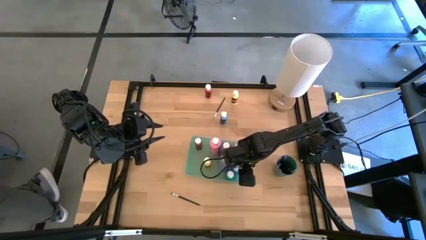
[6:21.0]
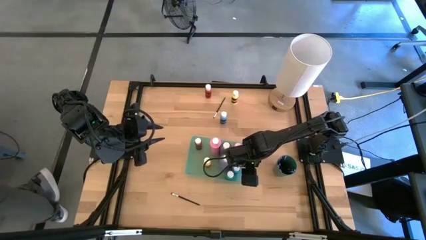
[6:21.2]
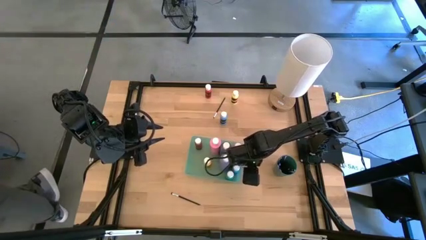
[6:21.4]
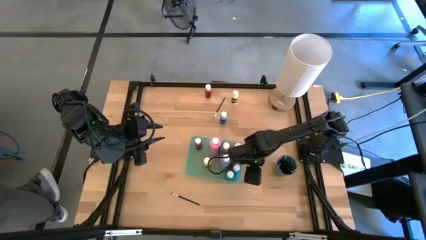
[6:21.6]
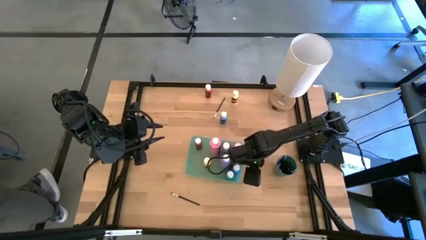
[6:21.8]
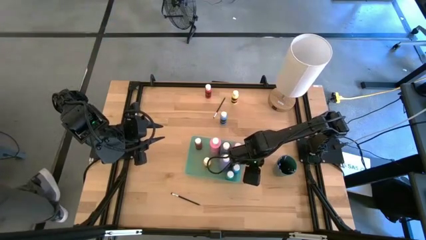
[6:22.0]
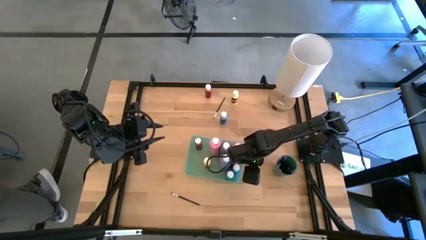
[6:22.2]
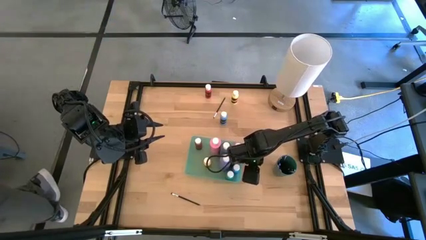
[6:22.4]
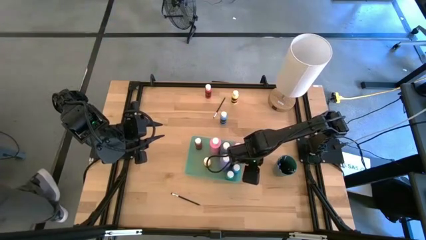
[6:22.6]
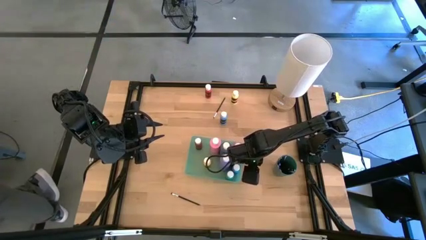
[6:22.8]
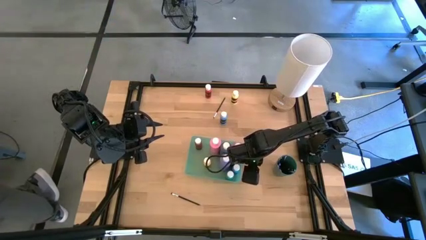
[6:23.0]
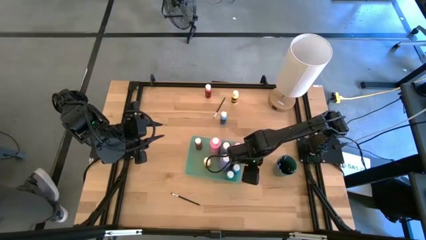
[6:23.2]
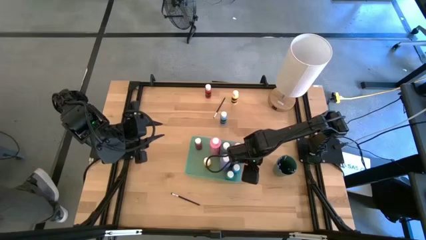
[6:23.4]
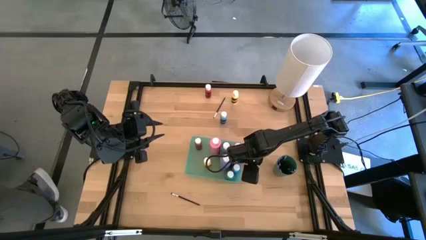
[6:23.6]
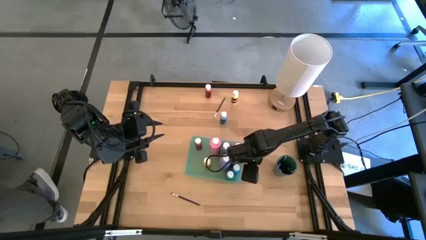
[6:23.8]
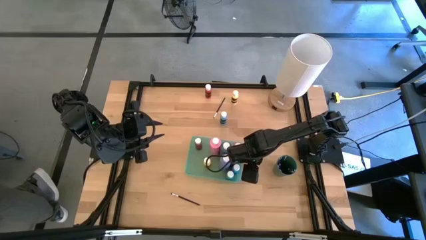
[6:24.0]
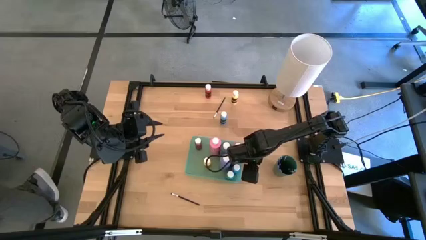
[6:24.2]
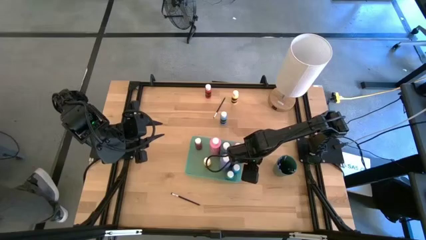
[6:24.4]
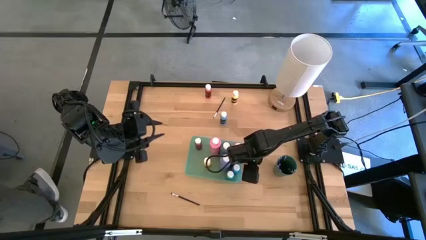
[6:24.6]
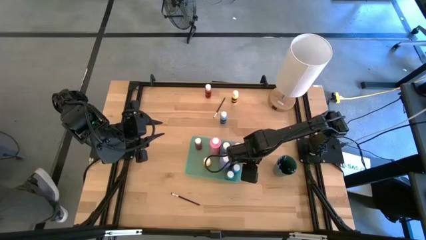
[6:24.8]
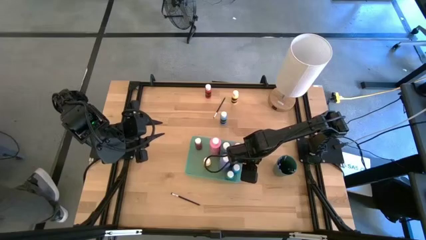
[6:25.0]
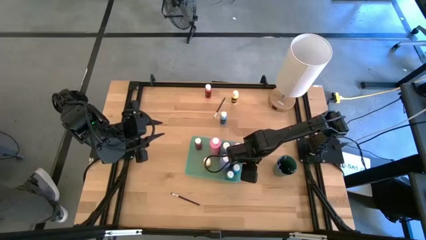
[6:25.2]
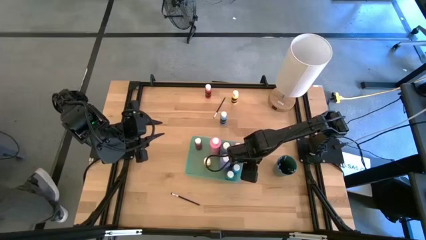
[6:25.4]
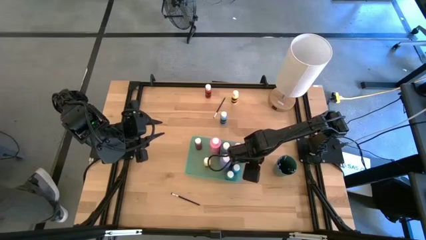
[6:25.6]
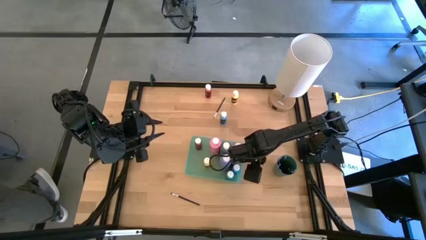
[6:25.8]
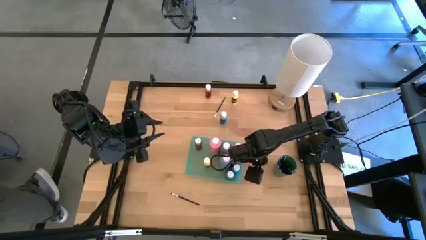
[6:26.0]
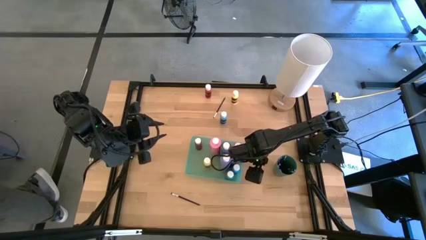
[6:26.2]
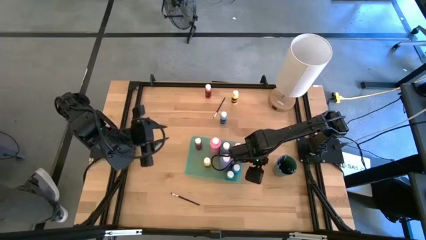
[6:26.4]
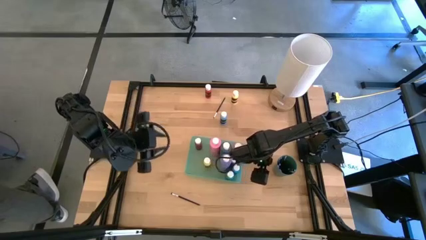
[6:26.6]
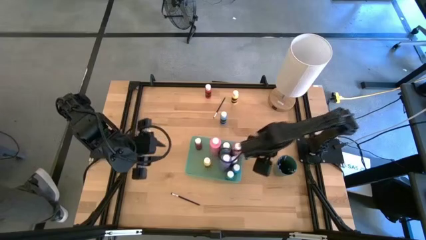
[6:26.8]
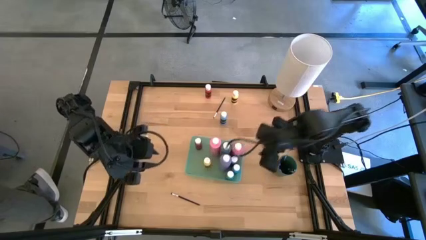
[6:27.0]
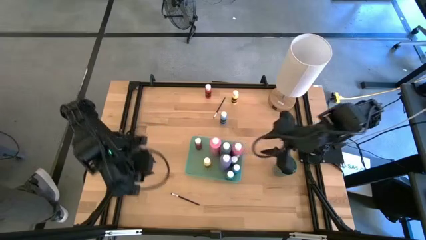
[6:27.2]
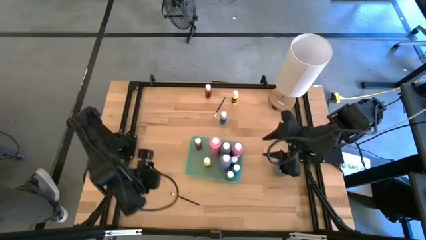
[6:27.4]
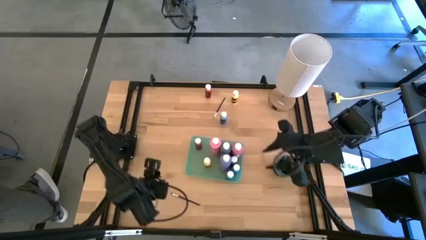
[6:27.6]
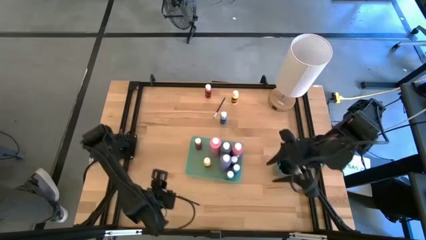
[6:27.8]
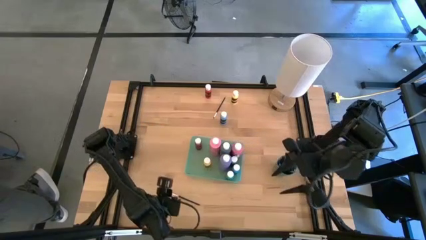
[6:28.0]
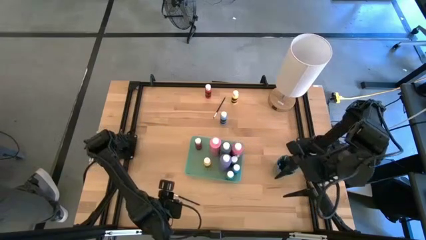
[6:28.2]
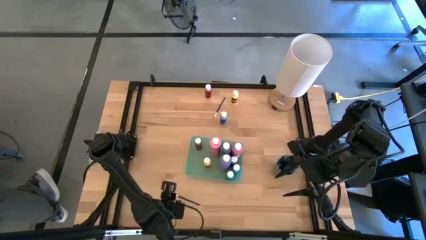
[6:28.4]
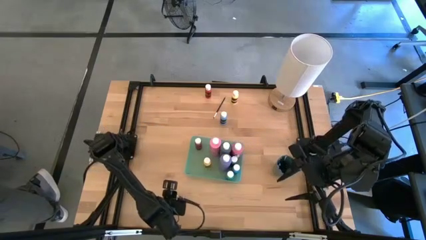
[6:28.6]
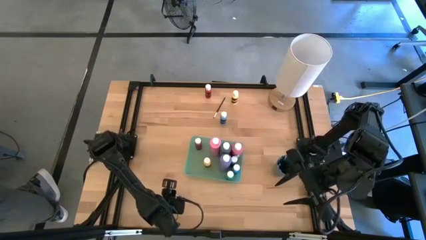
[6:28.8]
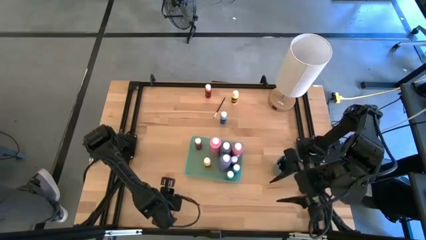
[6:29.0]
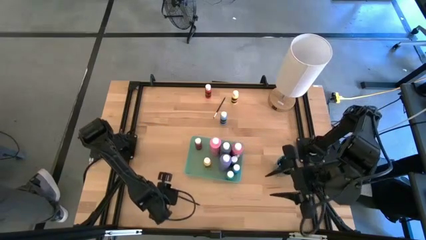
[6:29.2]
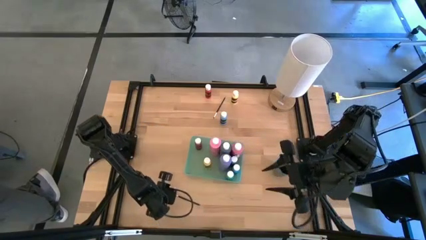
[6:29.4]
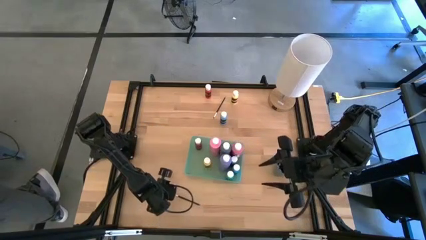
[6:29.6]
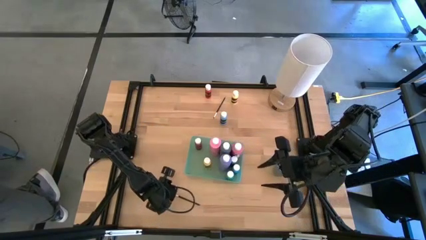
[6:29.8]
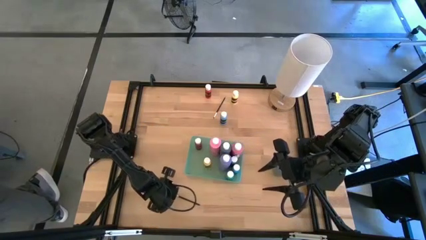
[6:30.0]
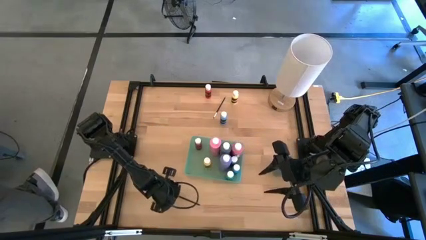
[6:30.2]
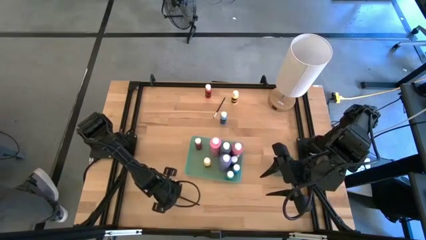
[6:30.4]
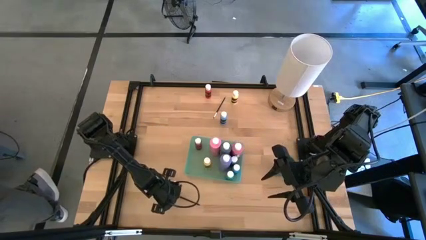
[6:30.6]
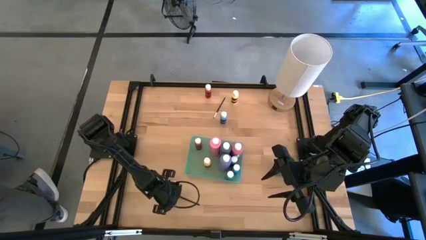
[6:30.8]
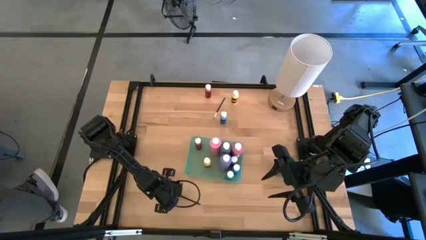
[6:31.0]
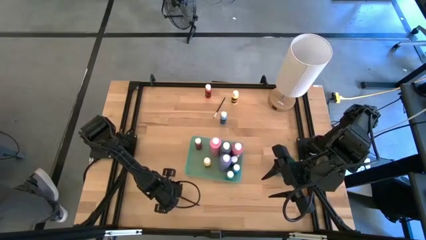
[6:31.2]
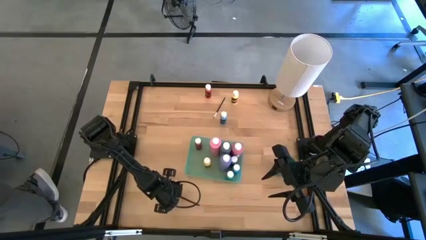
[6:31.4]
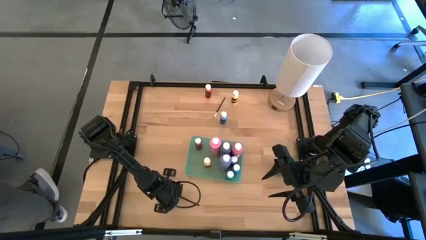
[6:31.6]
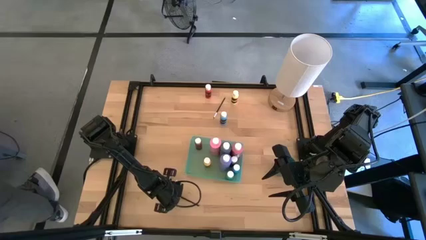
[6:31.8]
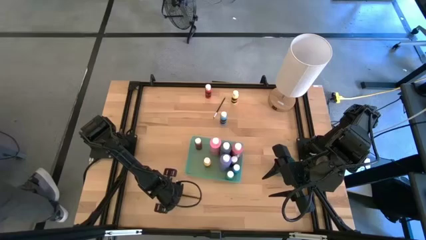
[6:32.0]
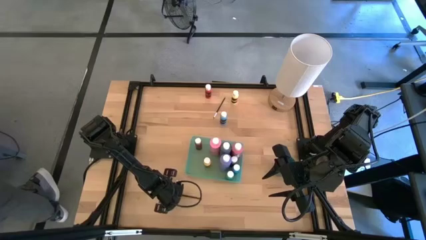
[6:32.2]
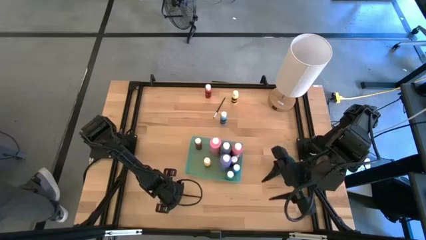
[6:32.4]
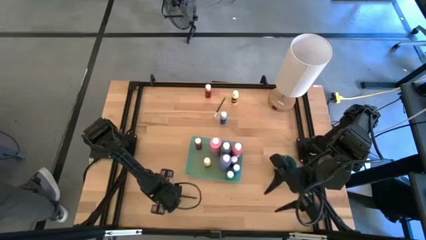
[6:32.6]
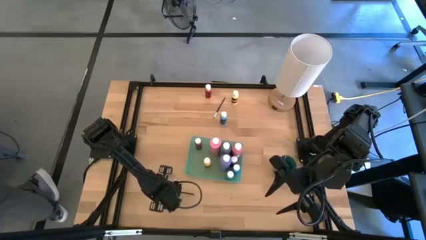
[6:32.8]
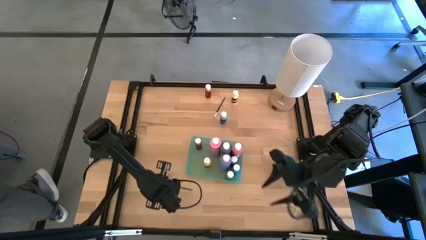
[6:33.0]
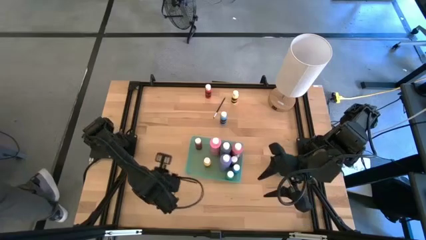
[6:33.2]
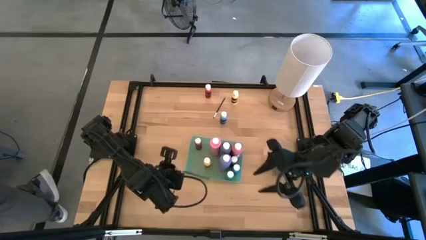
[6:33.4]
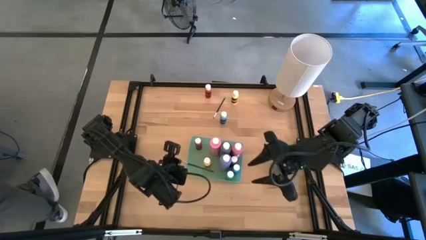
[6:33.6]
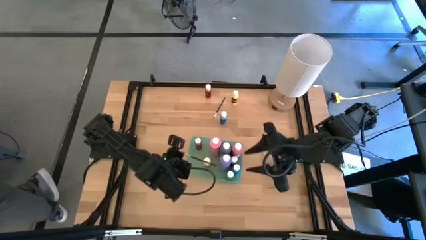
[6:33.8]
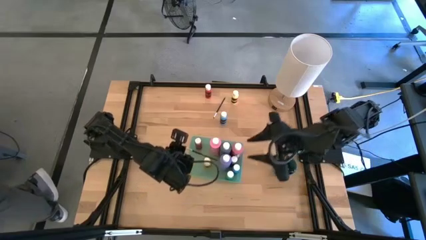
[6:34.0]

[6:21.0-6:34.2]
Task: Pick & Place Paint Supplies
Put the black eyeshadow brush into the green cup
